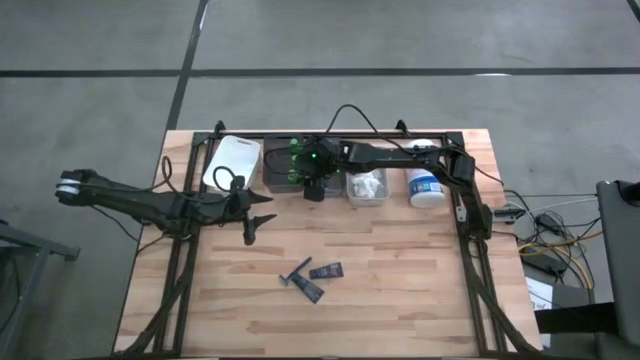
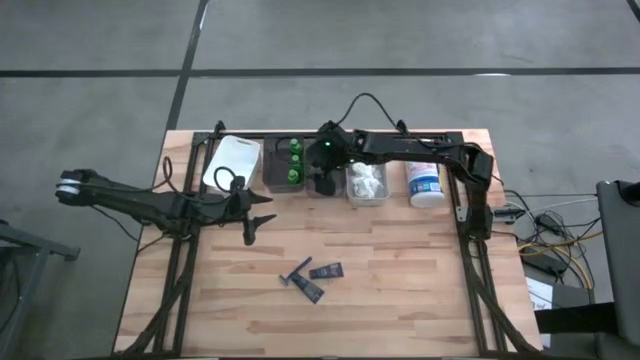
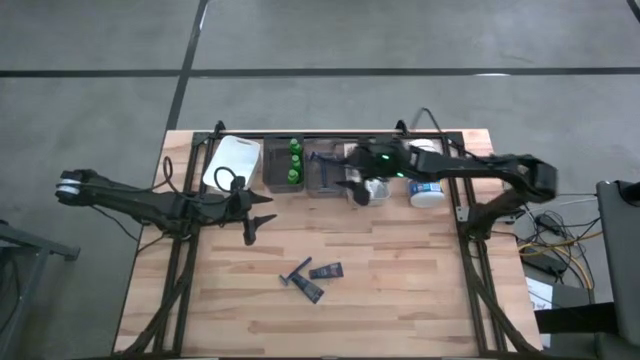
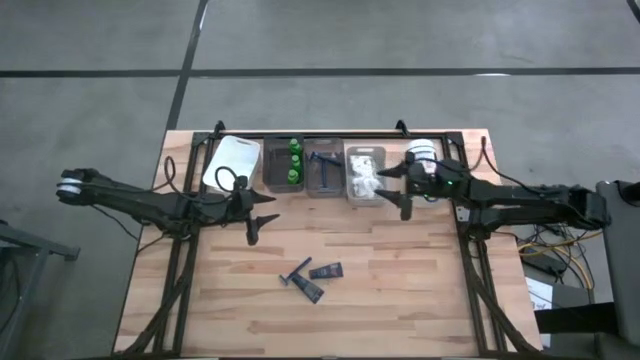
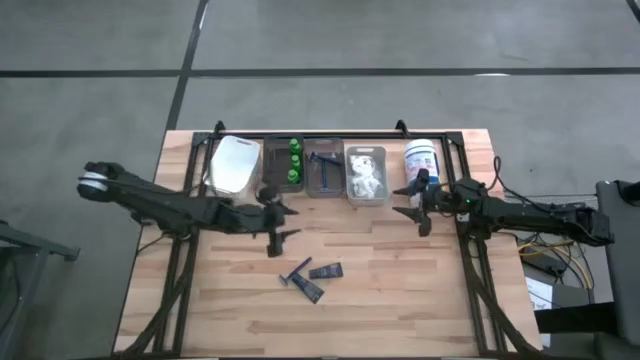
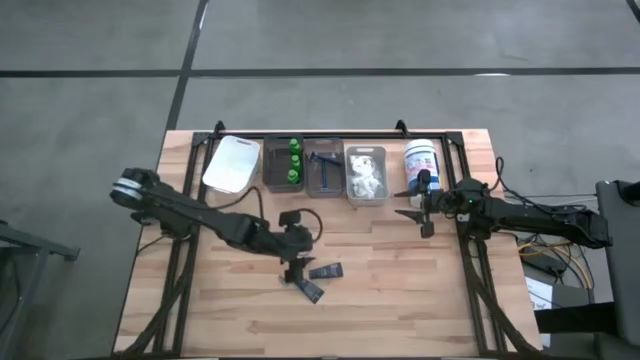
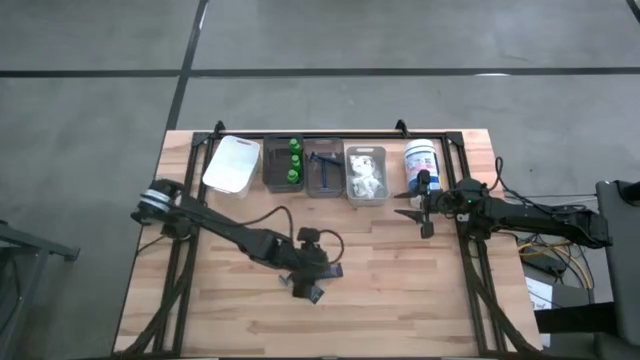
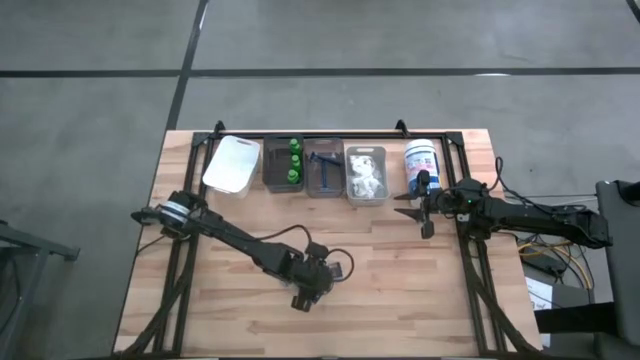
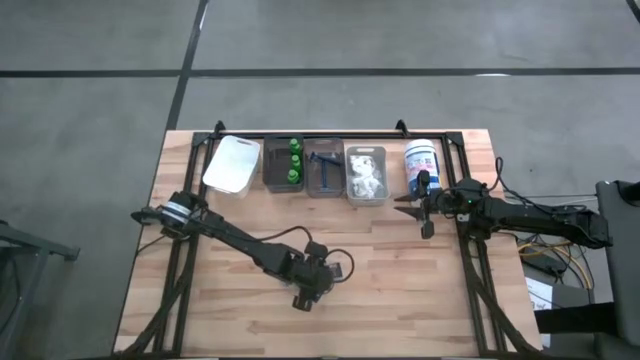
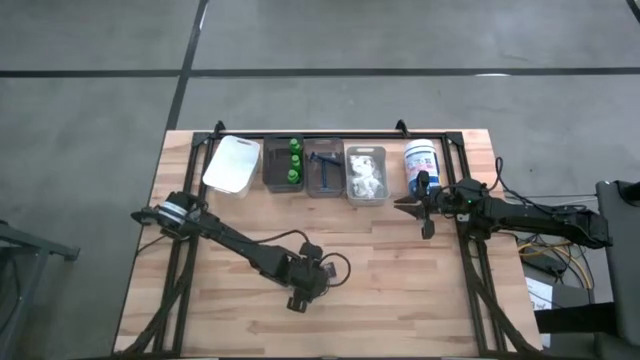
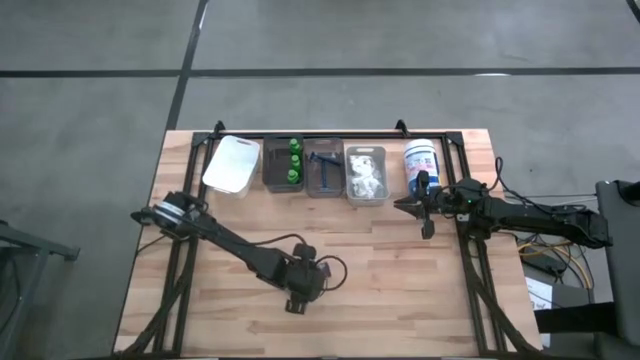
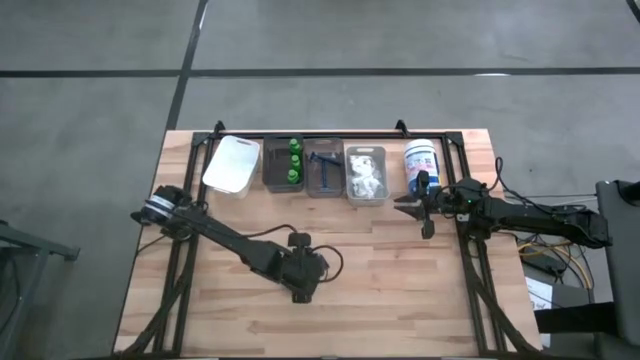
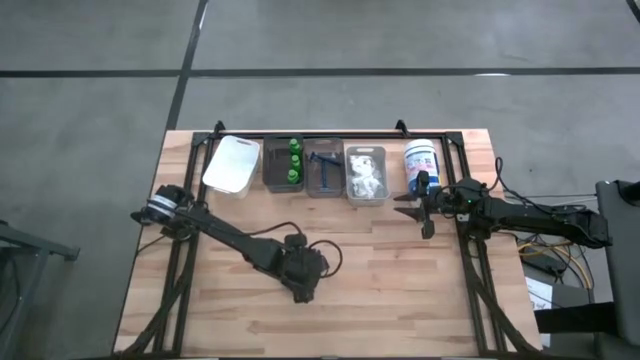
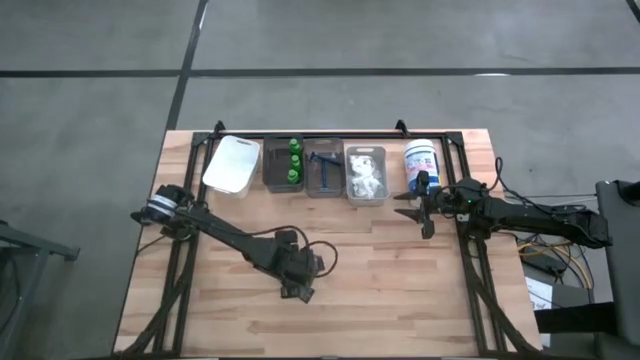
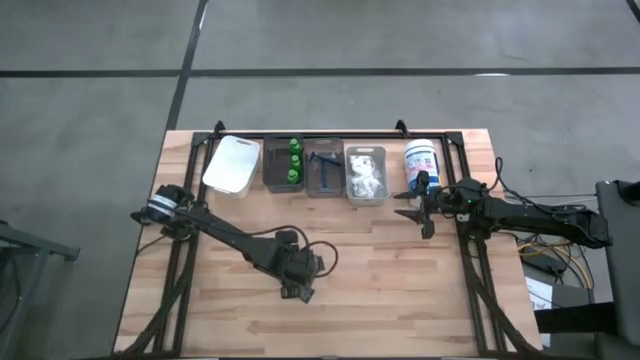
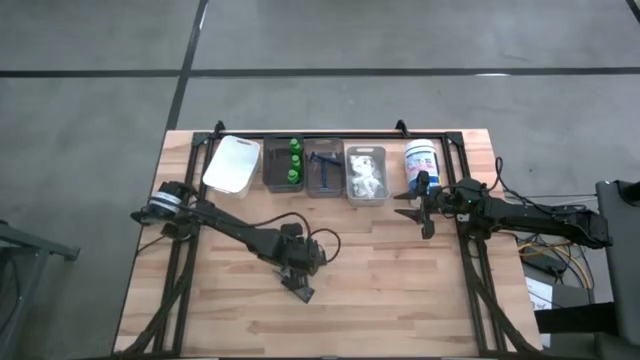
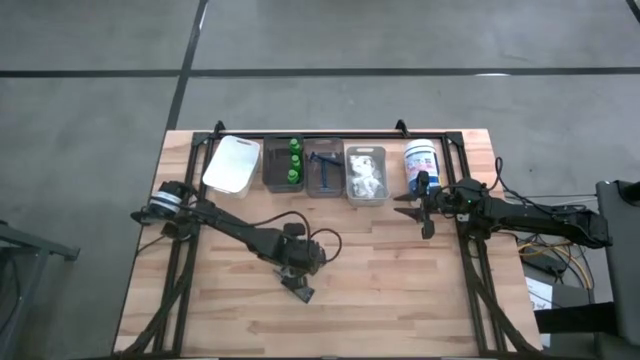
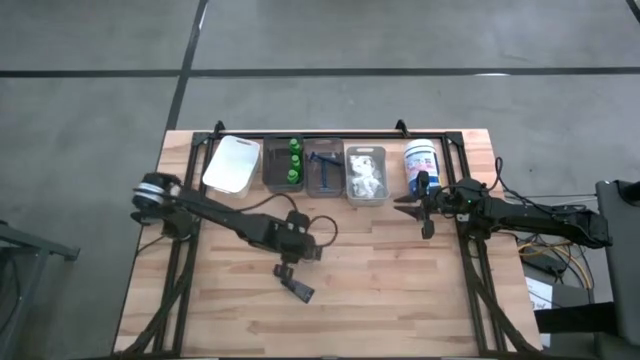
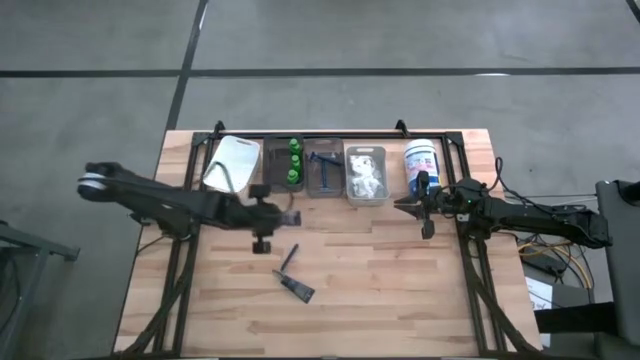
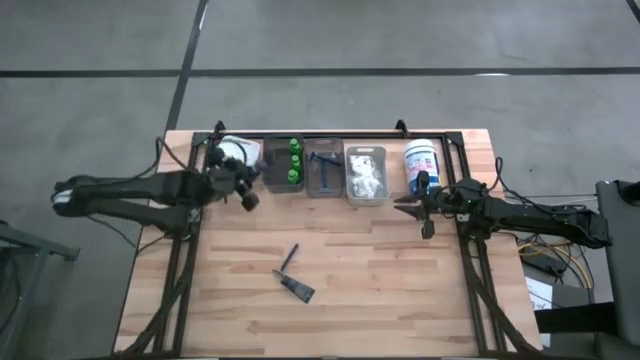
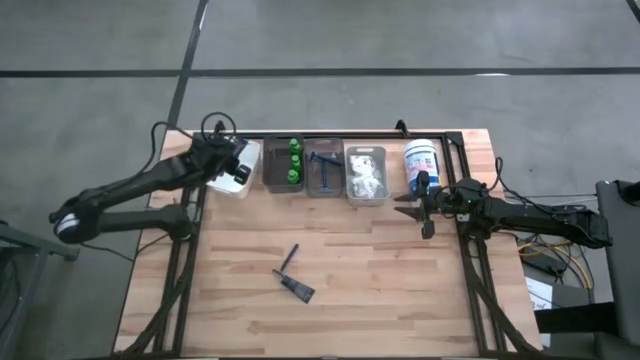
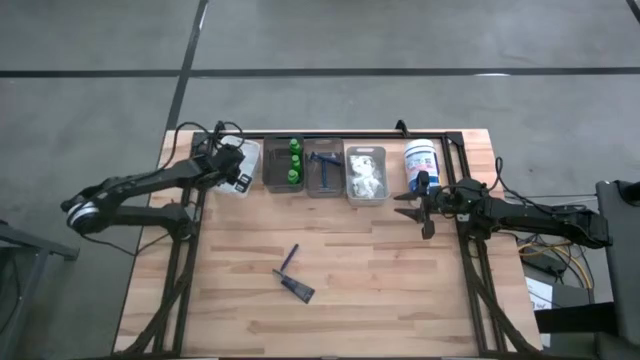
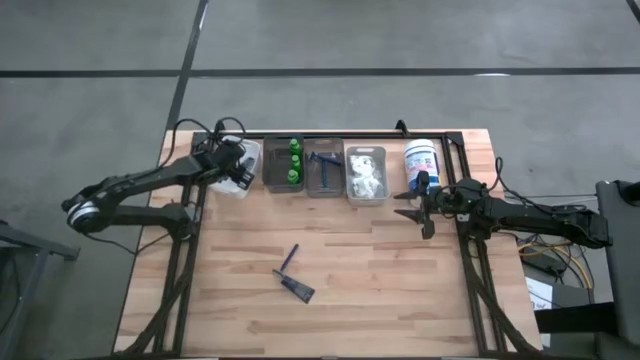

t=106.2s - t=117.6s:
Task: Pick & Place Travel size toiletries
Put the top shaving cream into the white bin

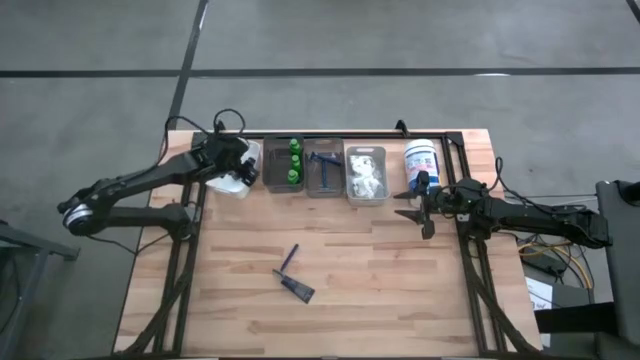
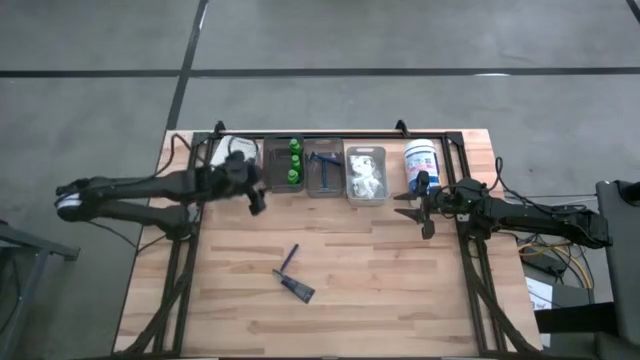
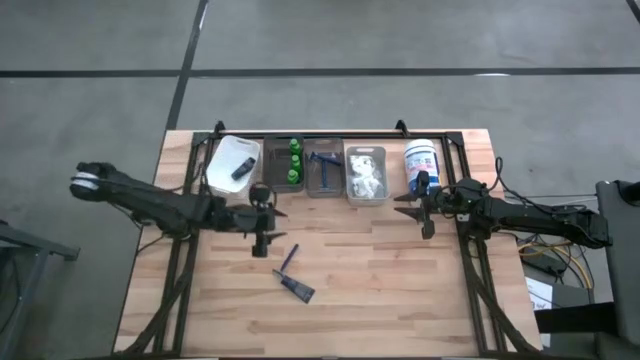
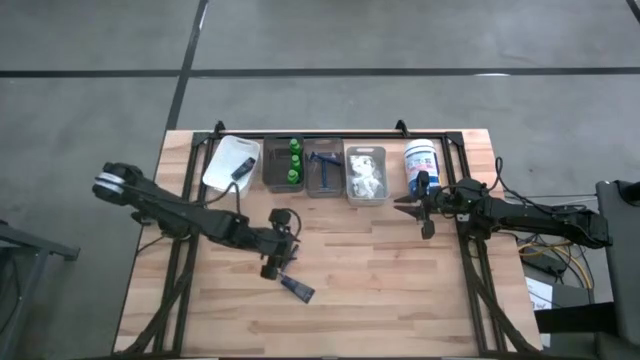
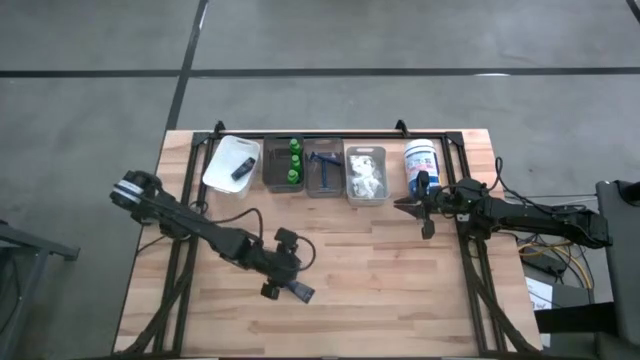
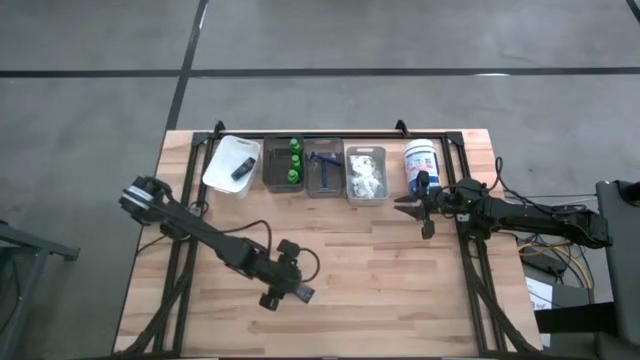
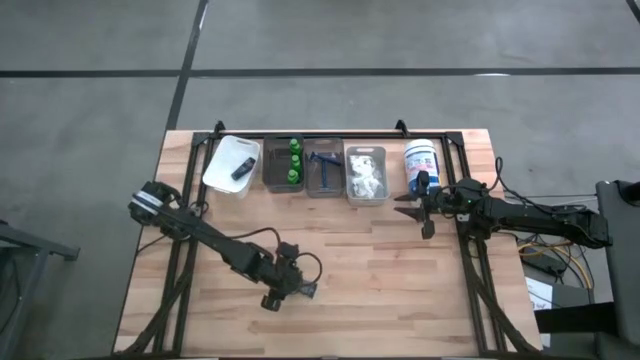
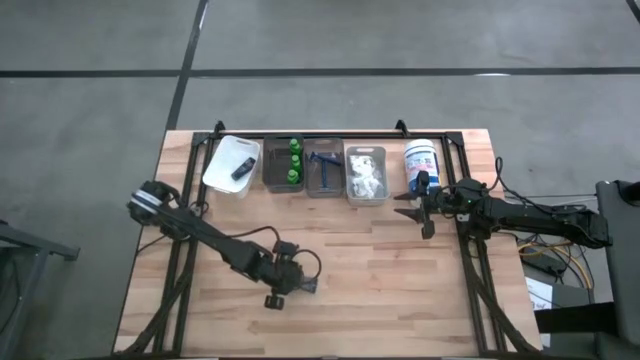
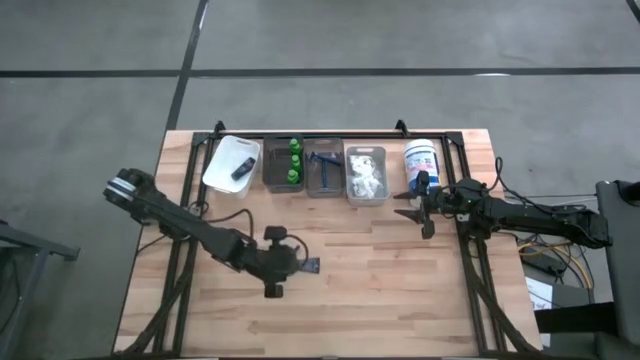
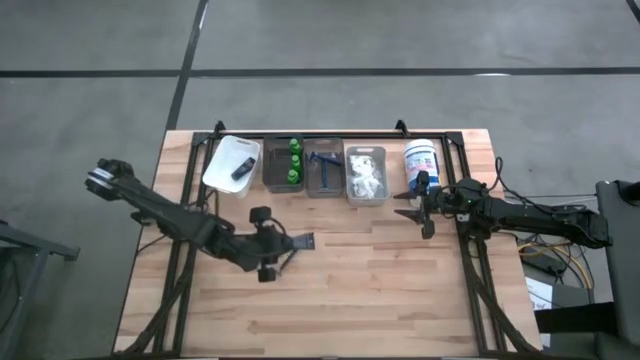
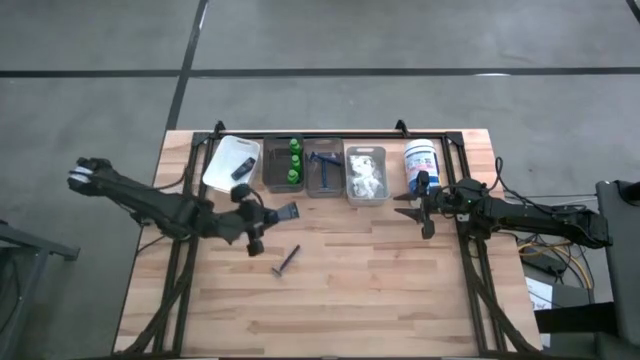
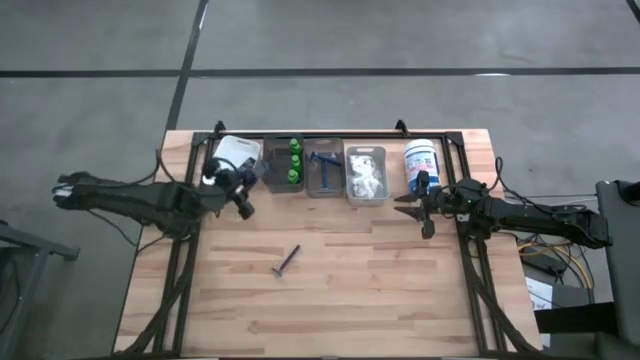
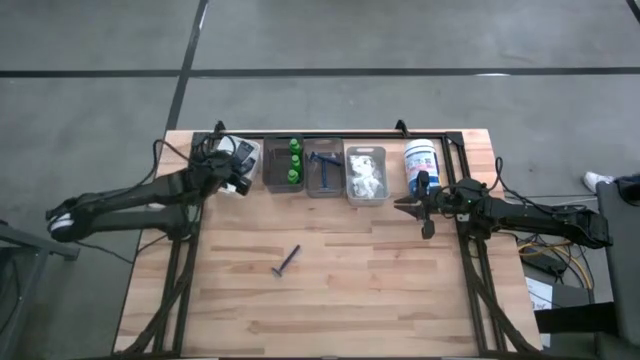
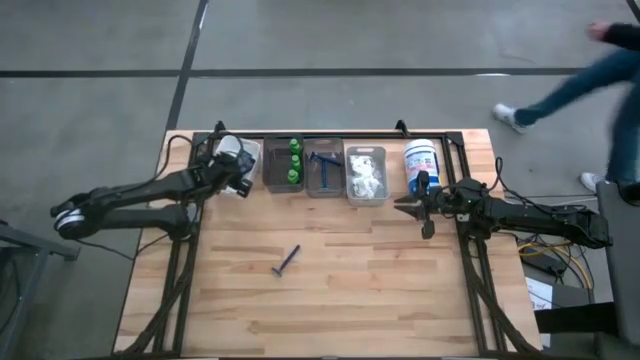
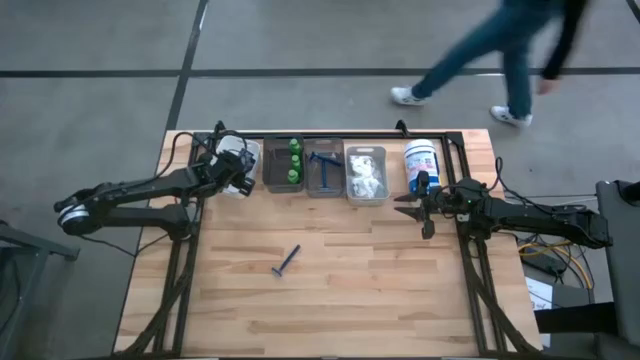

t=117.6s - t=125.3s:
Put the shaving cream into the white bin
